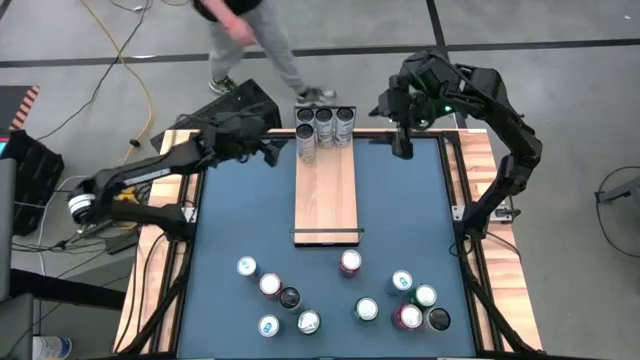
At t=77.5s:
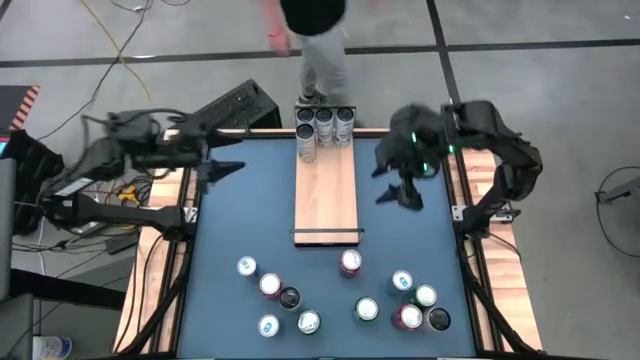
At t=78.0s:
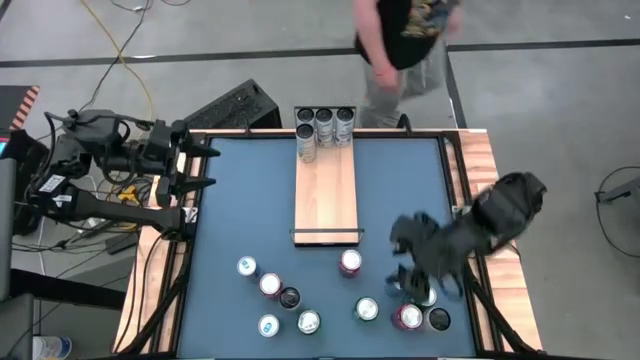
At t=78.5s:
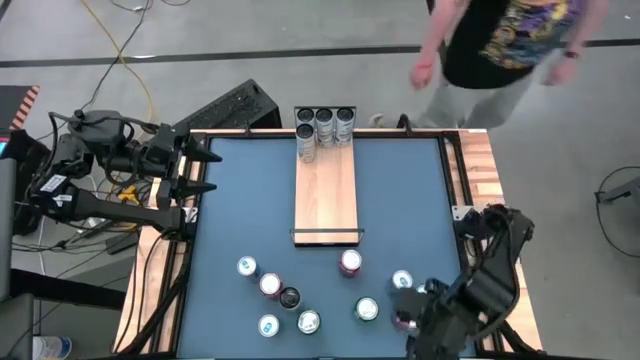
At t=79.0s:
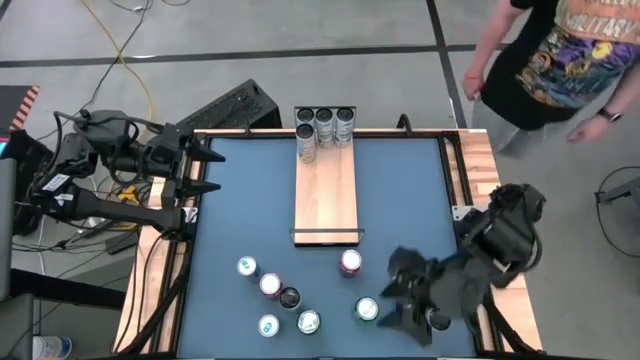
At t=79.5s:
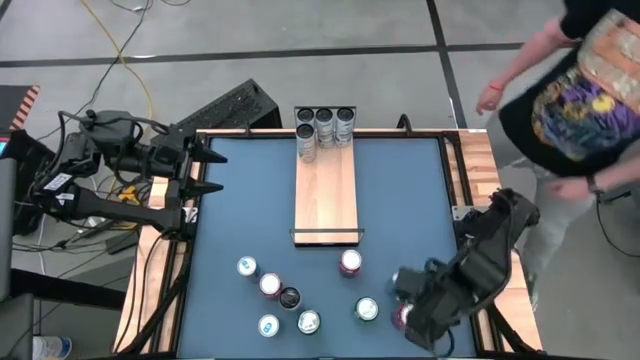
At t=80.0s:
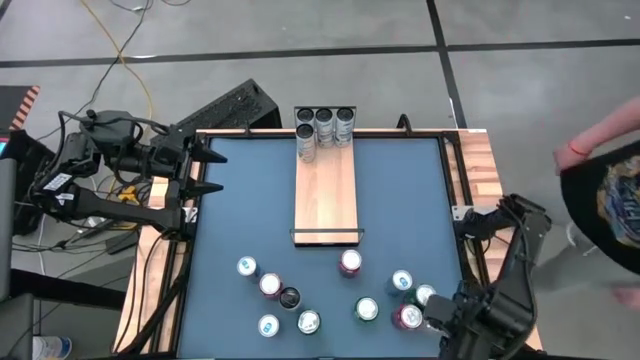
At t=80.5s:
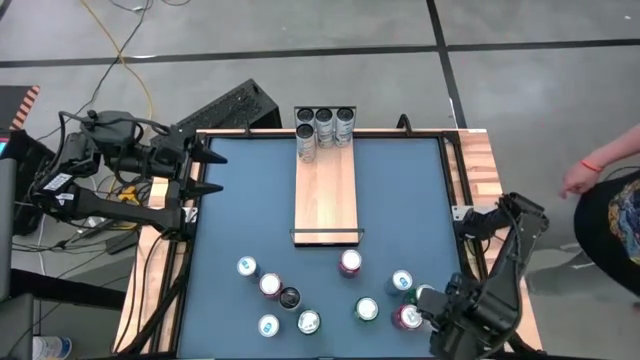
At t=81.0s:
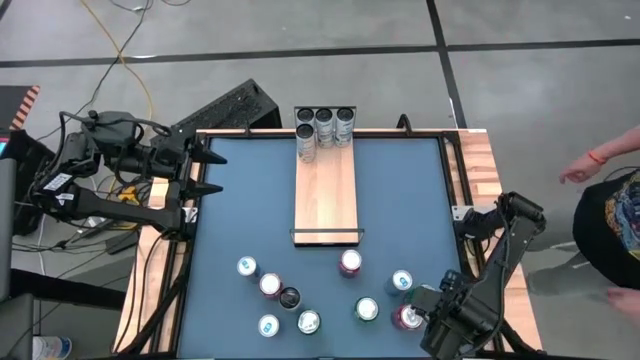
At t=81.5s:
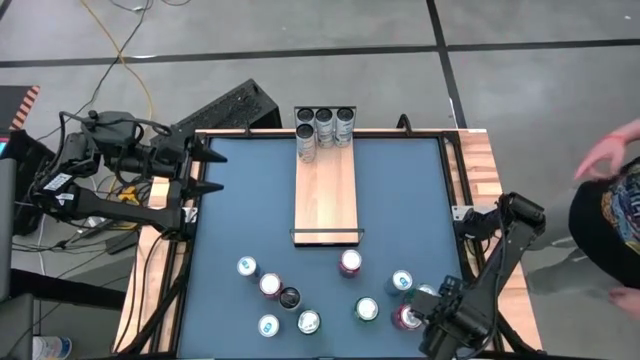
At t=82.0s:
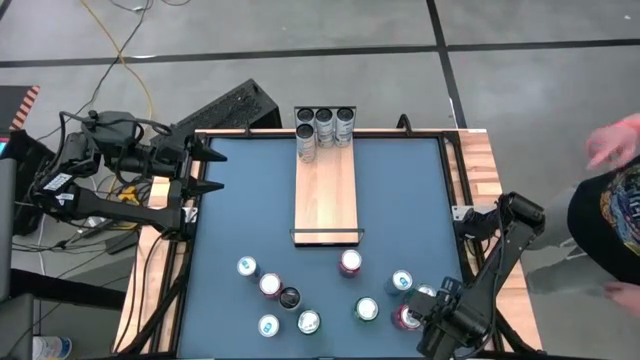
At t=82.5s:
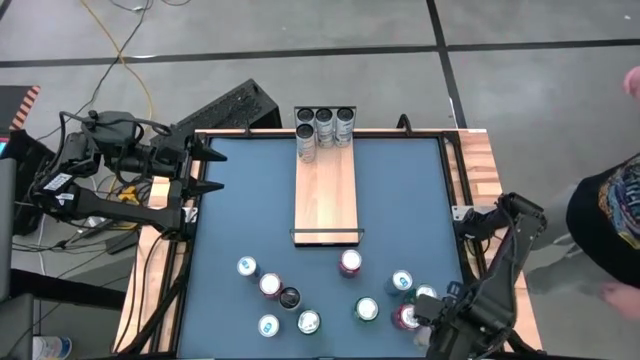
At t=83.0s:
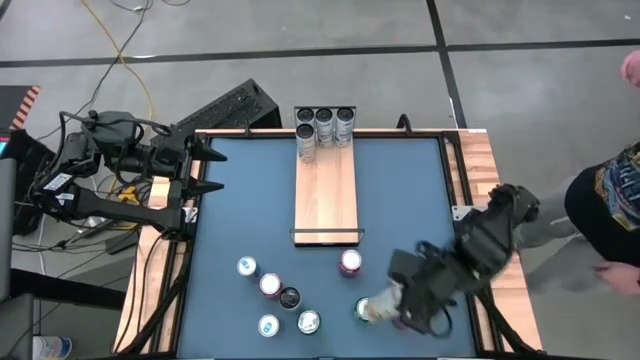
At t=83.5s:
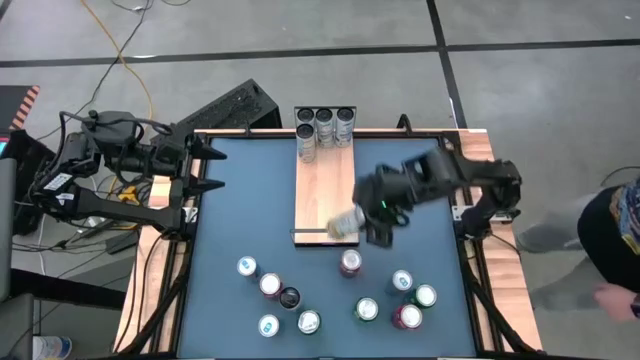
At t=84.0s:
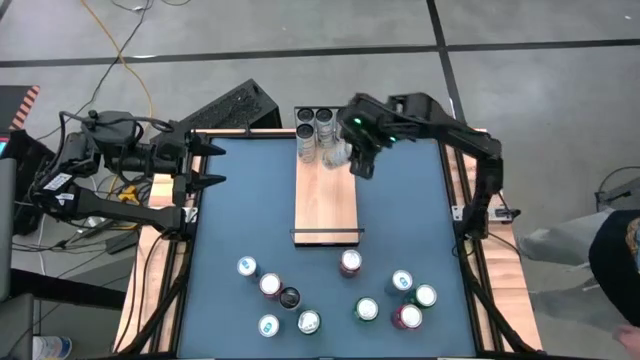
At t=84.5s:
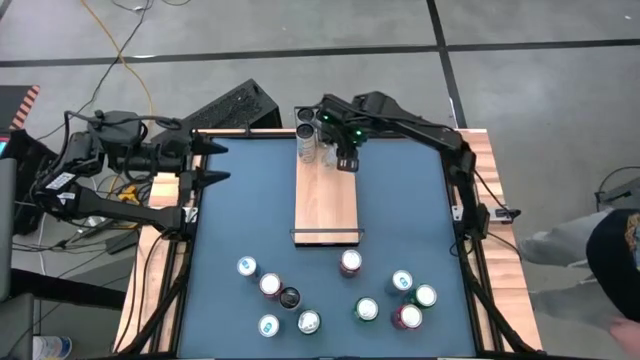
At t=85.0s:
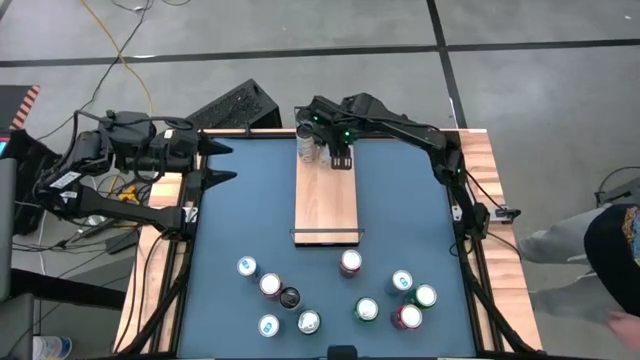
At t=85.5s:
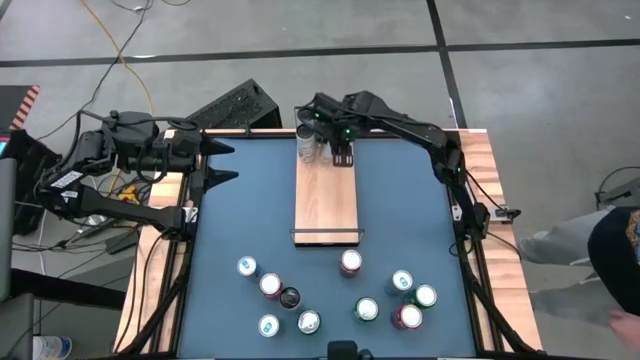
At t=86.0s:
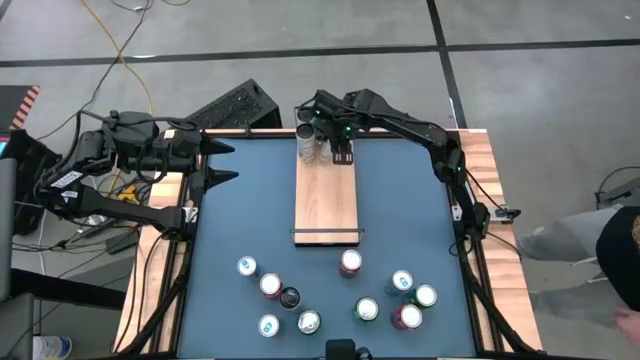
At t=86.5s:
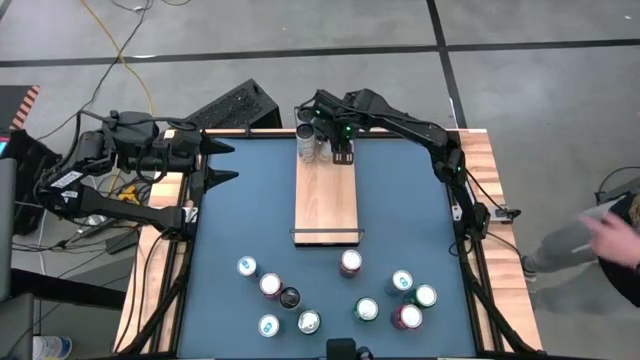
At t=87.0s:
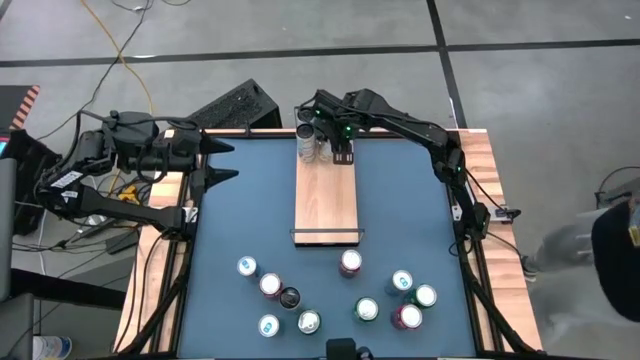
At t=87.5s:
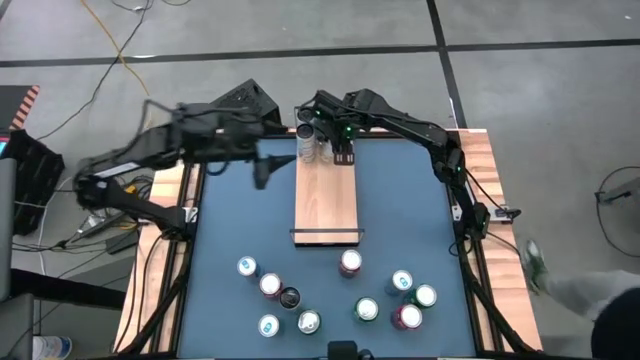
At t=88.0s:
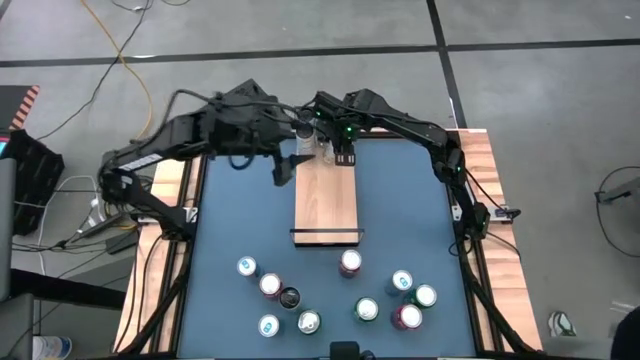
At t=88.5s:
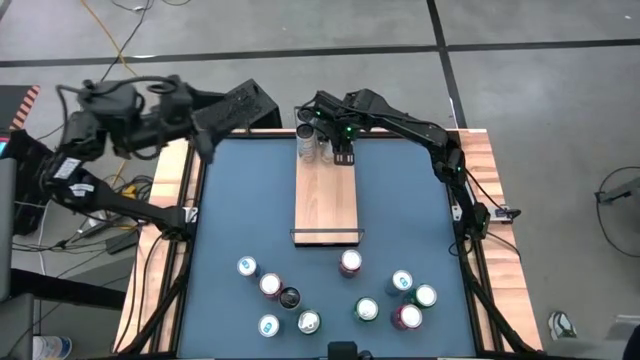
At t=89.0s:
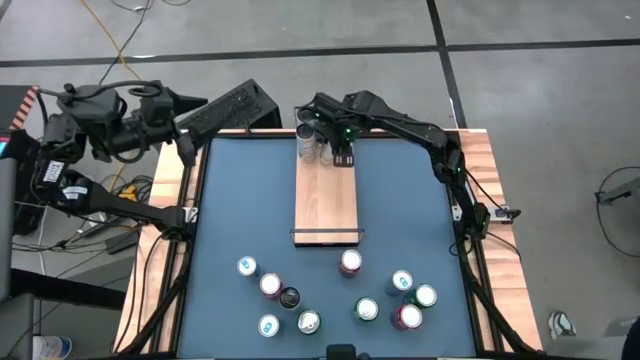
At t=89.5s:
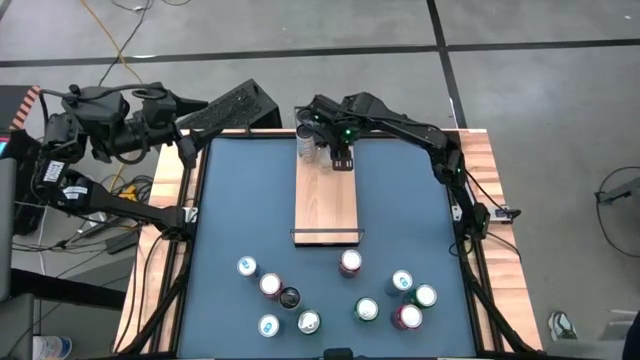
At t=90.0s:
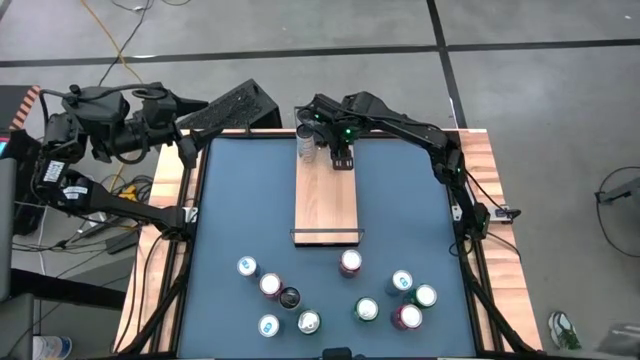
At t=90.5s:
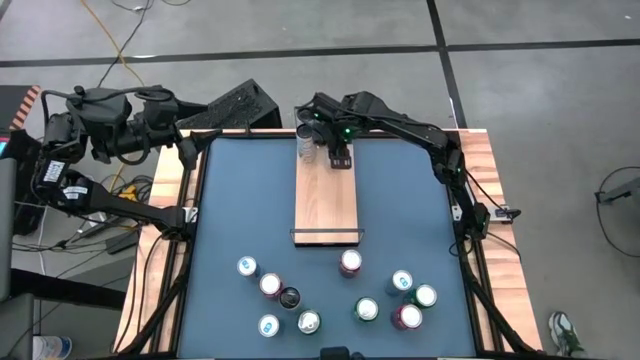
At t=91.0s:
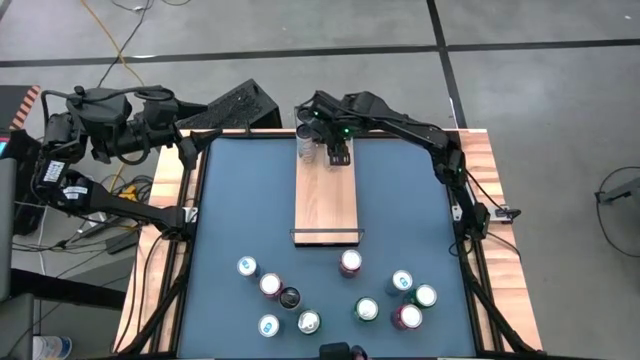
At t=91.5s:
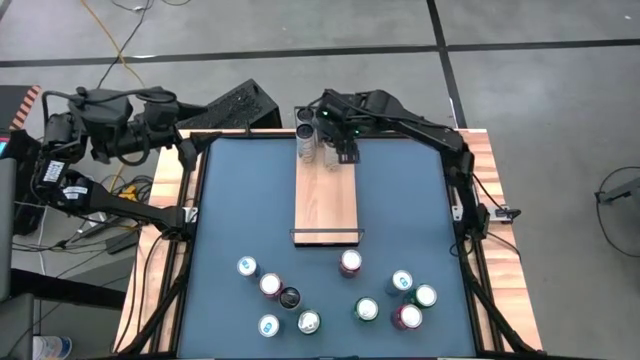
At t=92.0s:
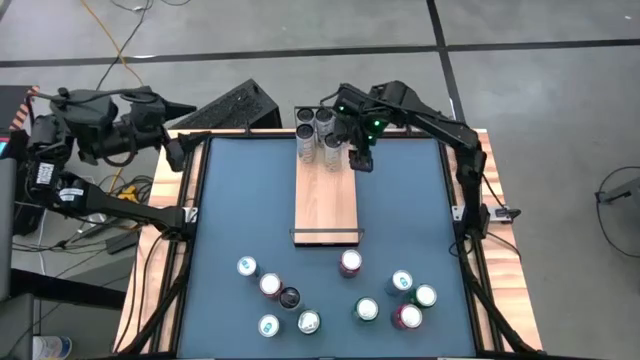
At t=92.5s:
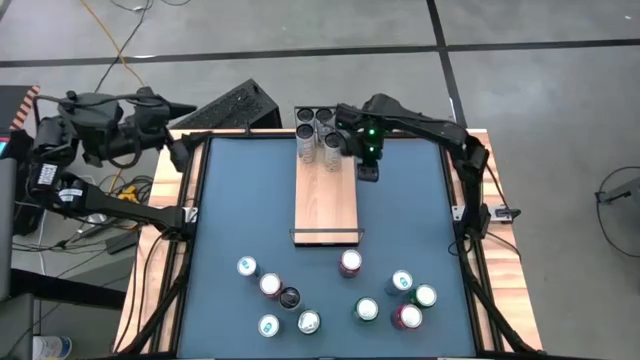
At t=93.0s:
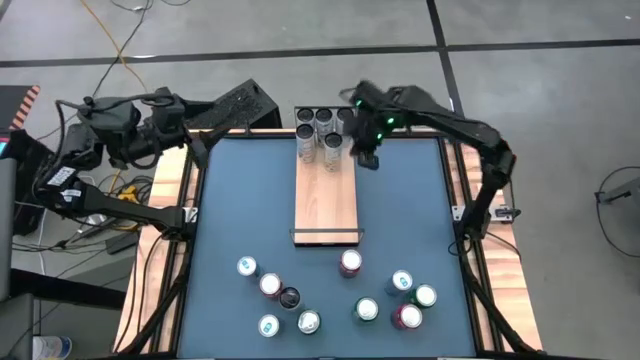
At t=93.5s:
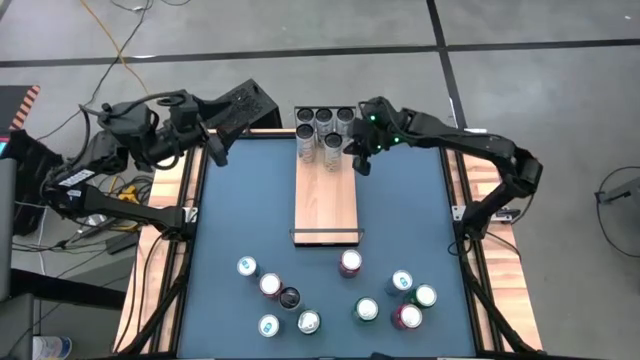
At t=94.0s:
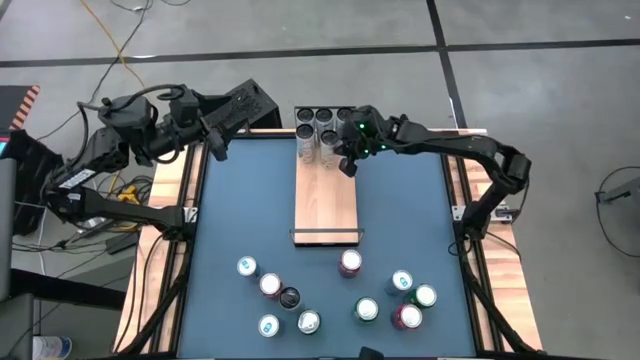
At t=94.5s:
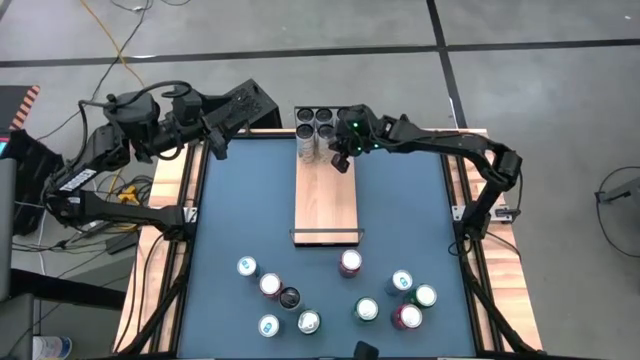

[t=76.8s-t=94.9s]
Task: Place canned beverage on shelf
Put the right white yellow soda can on the shelf aligned with the other white yellow soda can

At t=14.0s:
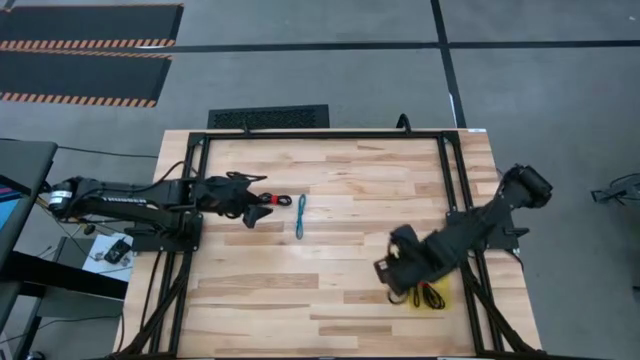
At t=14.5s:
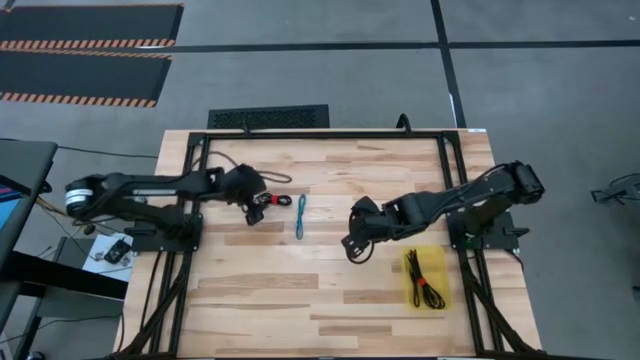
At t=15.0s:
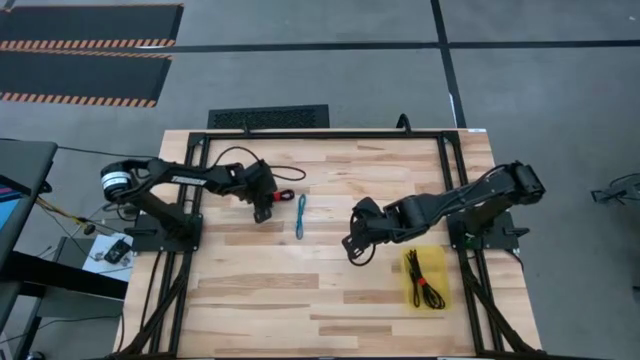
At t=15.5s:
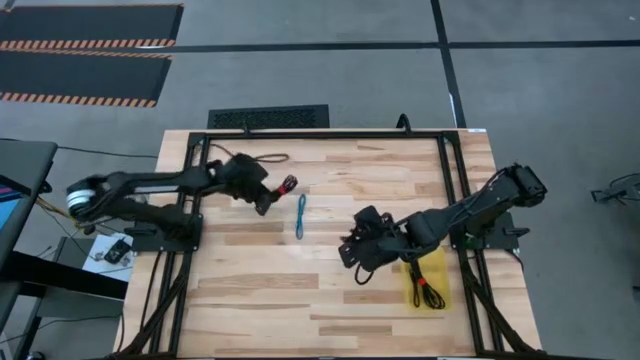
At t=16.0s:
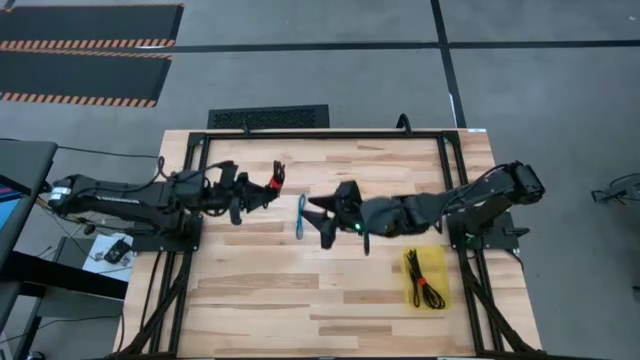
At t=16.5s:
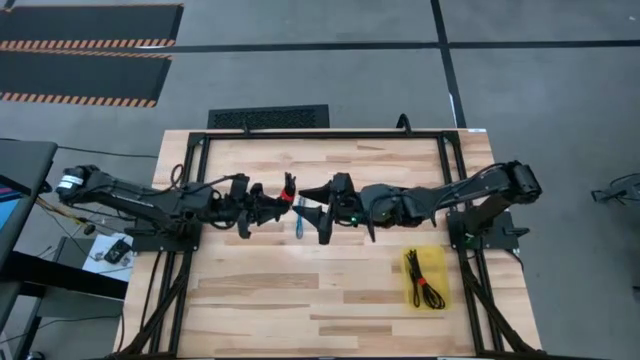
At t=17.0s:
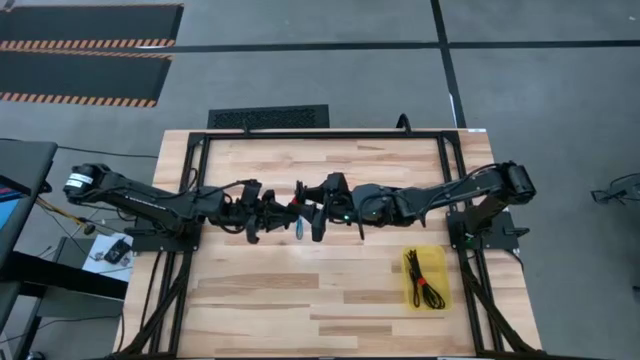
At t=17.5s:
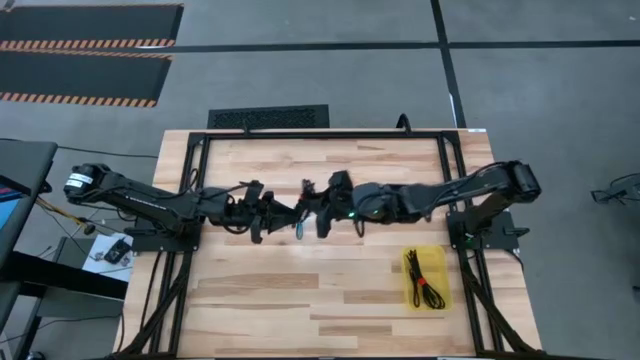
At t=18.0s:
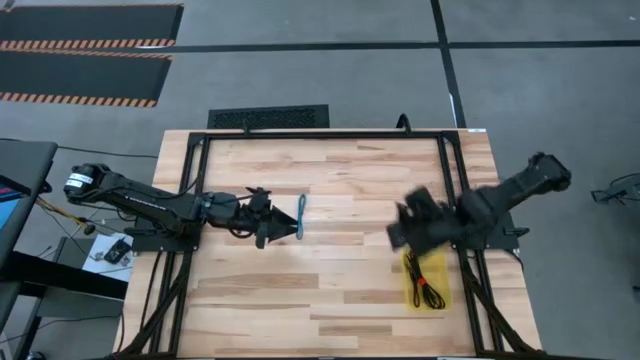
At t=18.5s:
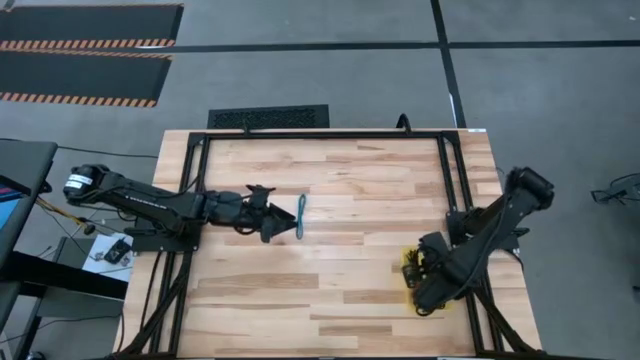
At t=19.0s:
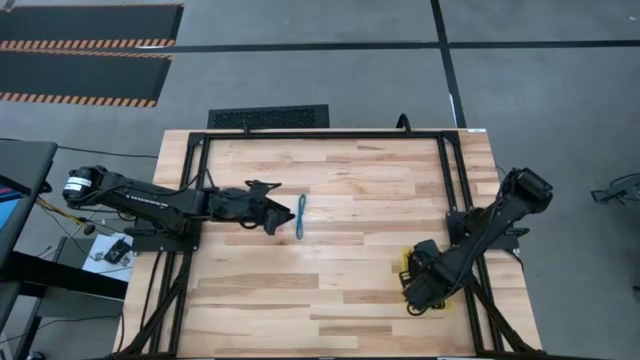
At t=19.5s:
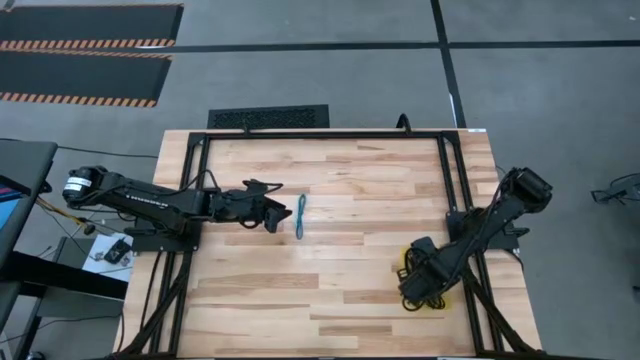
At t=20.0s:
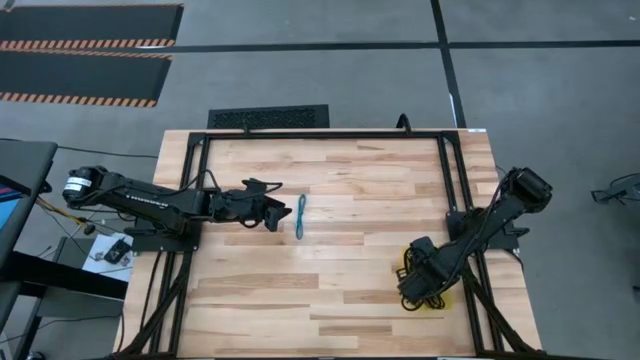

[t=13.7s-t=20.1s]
Task: Pick and place USB-C Cables
Put the black charger cable into the yellow bin
